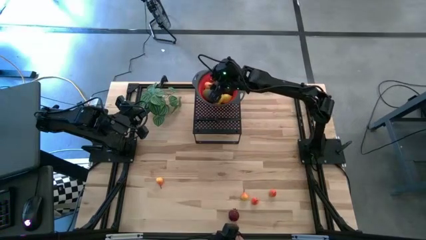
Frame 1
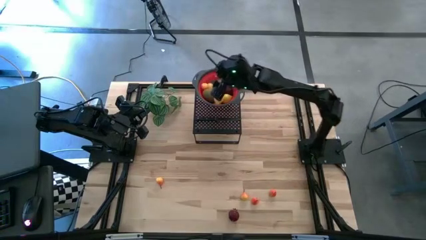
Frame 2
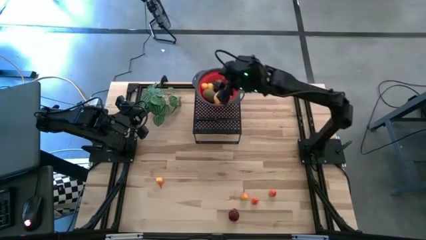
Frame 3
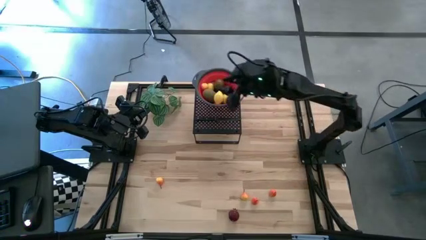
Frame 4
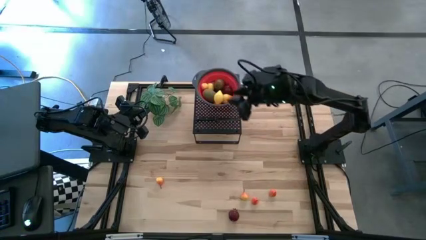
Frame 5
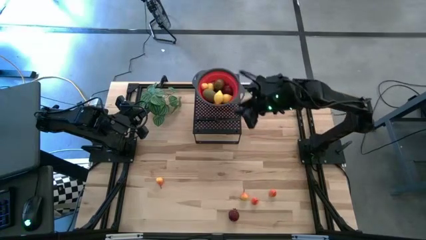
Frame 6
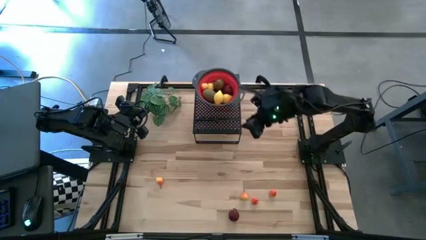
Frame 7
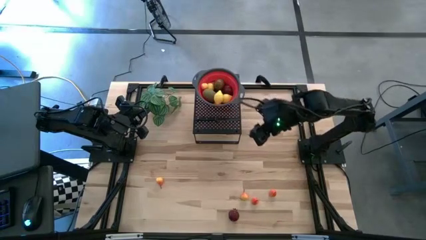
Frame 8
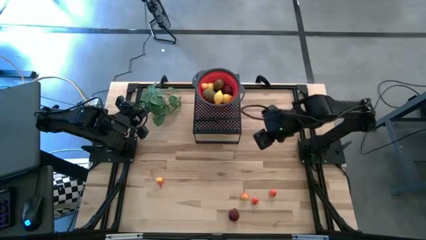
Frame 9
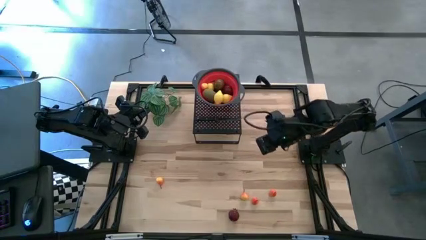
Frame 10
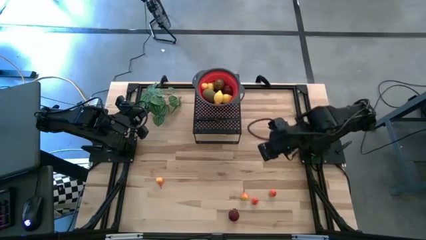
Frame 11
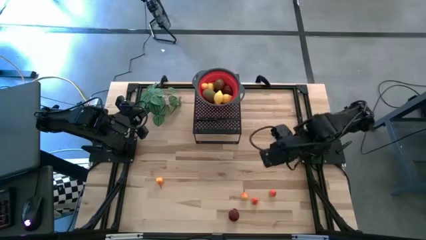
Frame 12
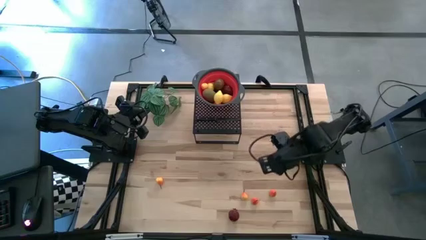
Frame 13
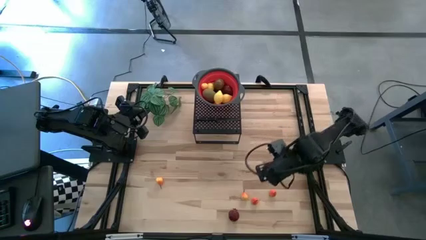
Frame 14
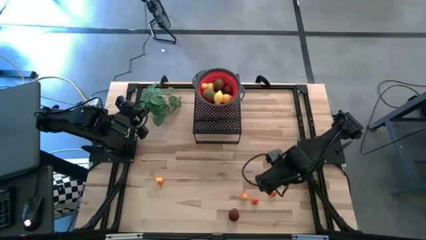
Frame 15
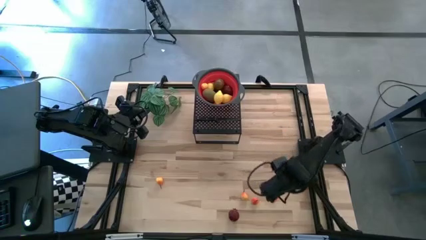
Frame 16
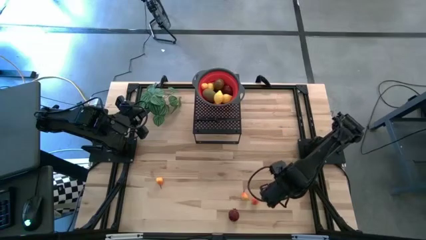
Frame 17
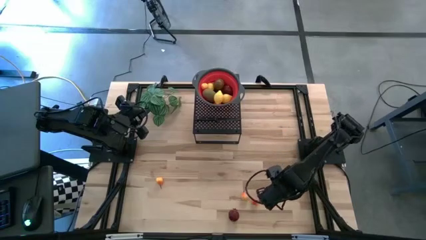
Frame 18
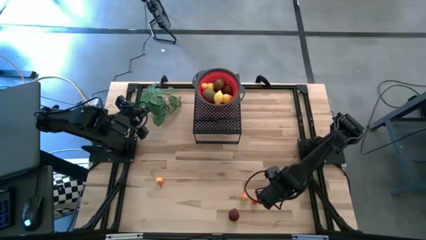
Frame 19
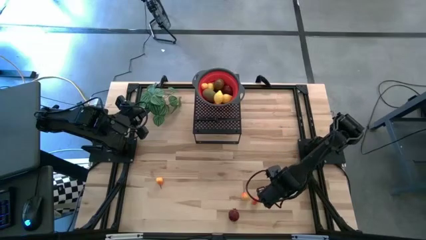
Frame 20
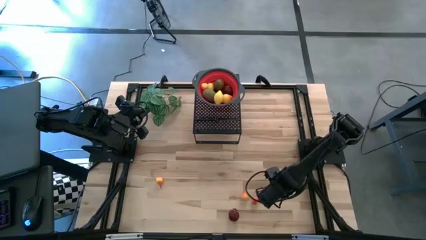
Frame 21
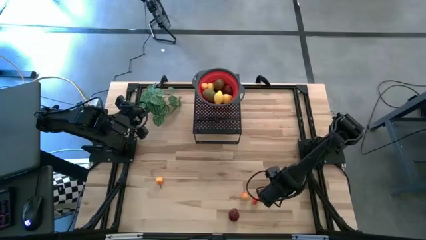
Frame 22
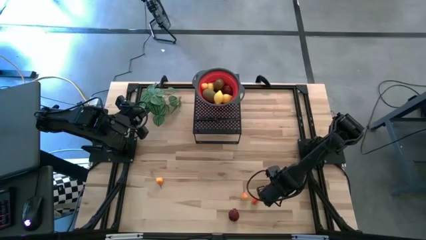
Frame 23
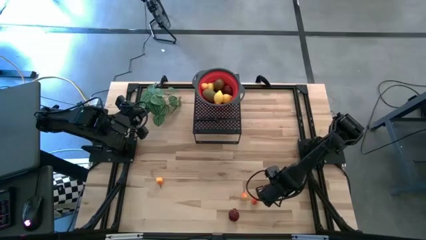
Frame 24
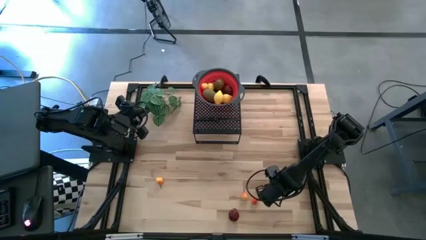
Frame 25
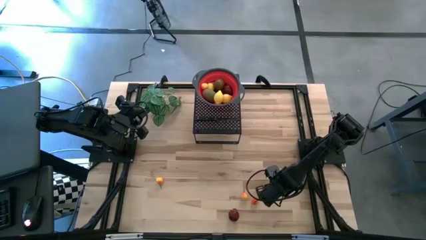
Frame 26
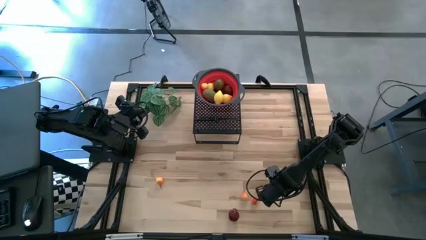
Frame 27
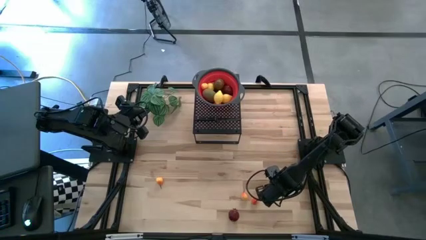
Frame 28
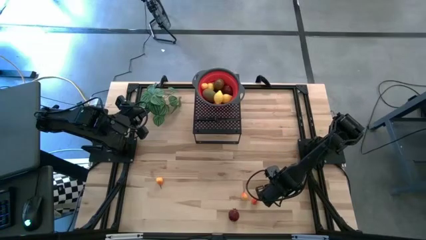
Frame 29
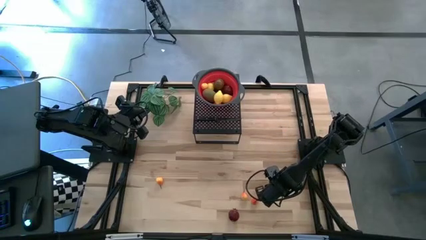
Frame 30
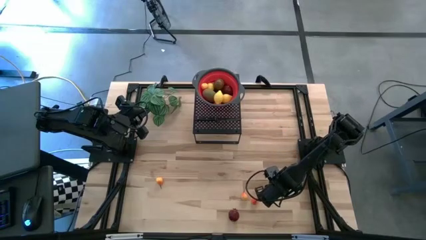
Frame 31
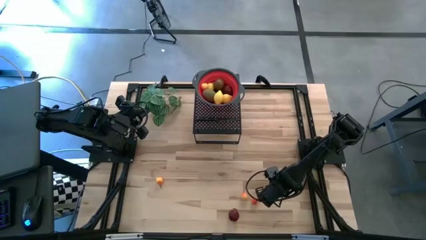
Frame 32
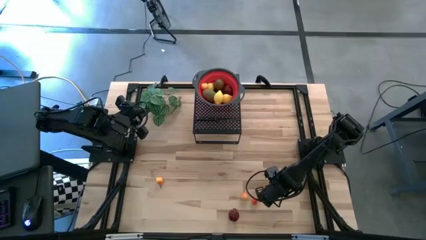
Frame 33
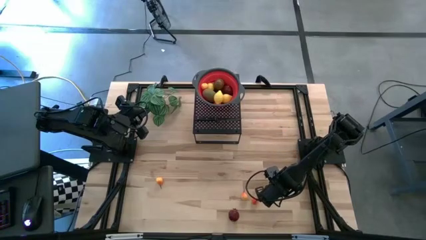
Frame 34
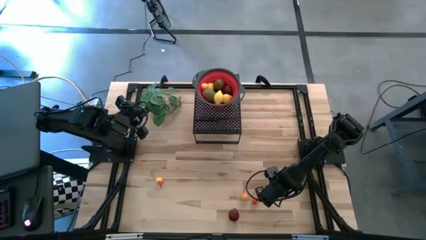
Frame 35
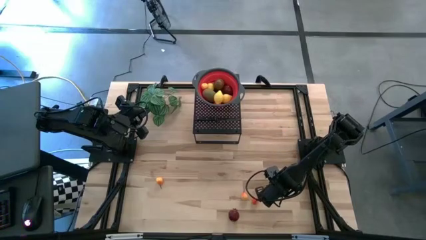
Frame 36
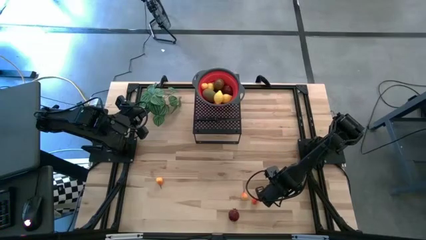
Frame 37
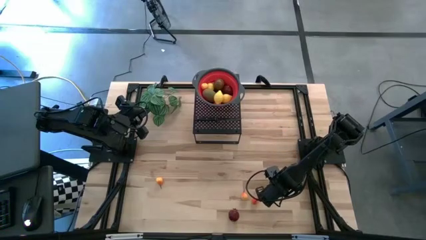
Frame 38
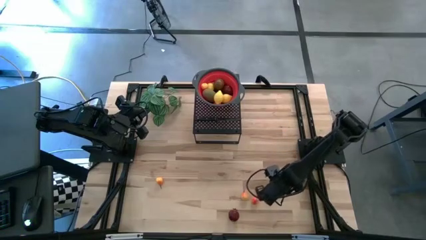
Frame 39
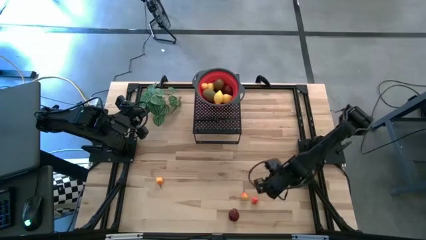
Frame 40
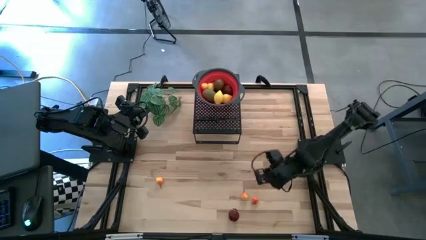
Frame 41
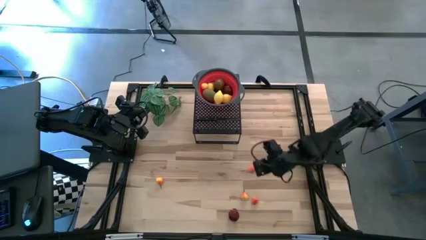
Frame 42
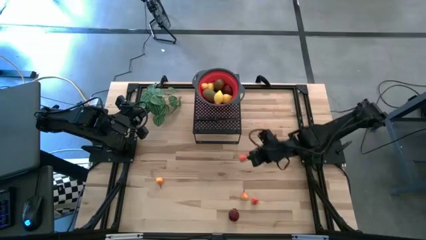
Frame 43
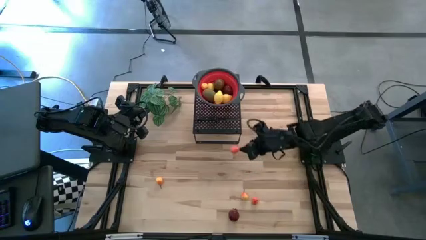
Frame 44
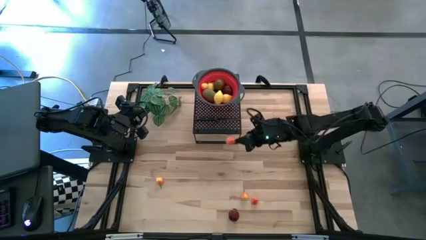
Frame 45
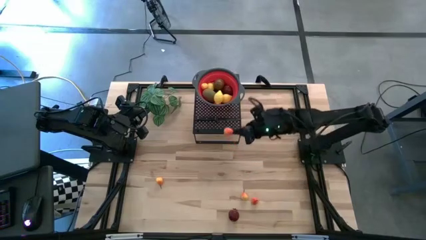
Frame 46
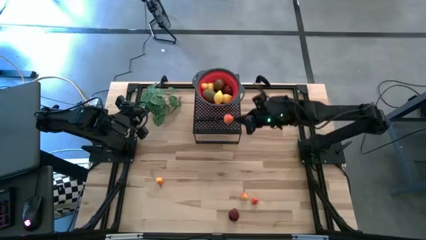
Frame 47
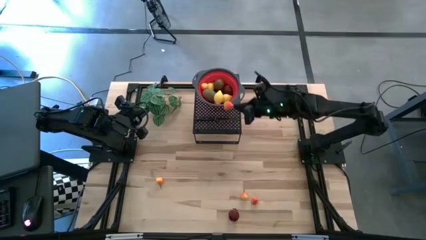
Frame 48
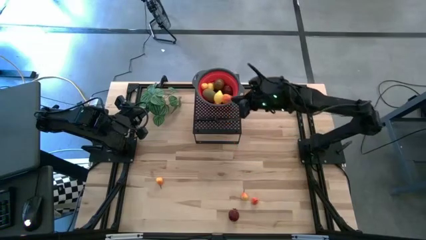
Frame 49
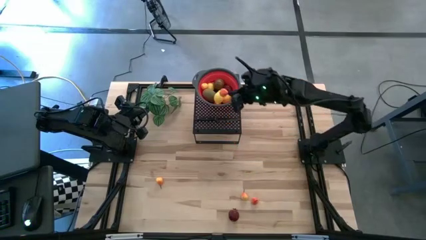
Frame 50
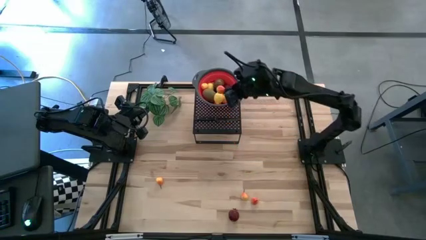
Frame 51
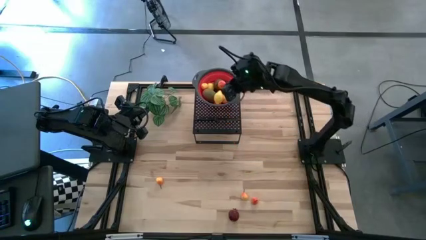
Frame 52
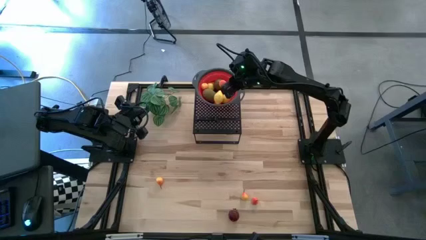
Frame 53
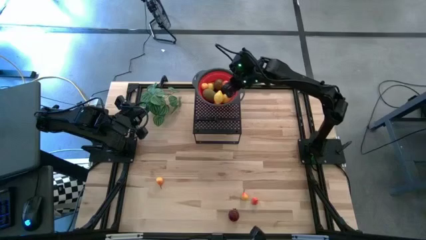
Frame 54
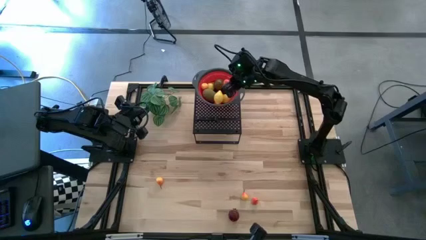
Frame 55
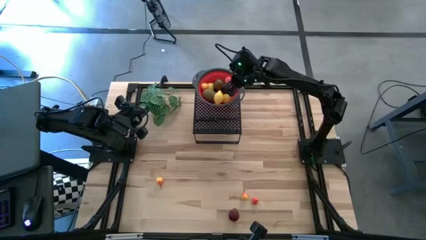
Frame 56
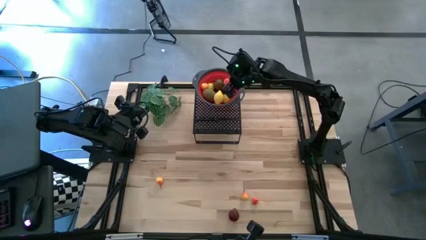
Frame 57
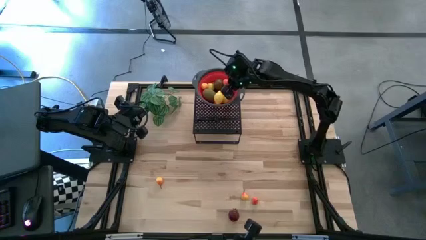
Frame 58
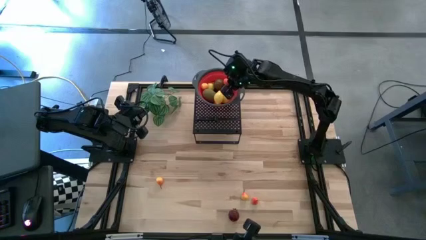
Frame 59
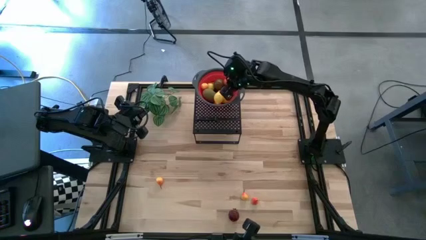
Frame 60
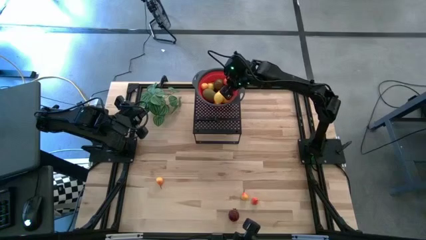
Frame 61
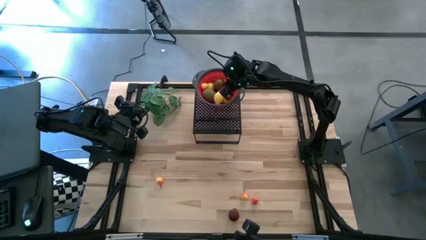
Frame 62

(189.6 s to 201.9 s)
Task: Pick & Place Fruit
Put the pear into the red strainer bowl
